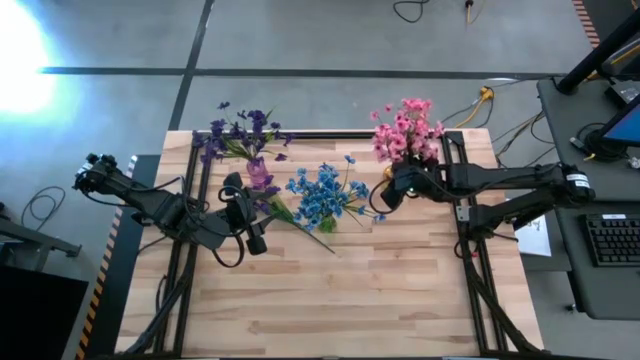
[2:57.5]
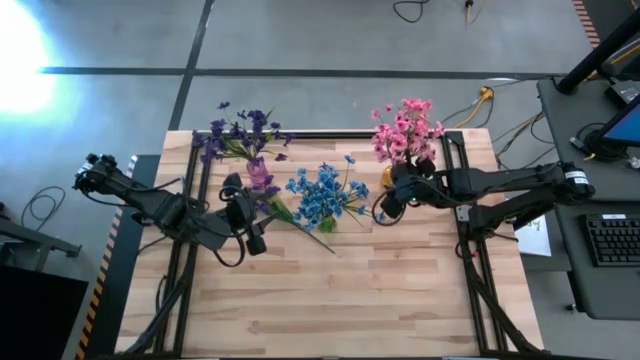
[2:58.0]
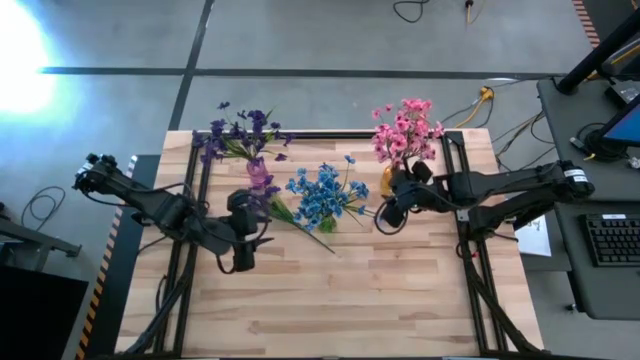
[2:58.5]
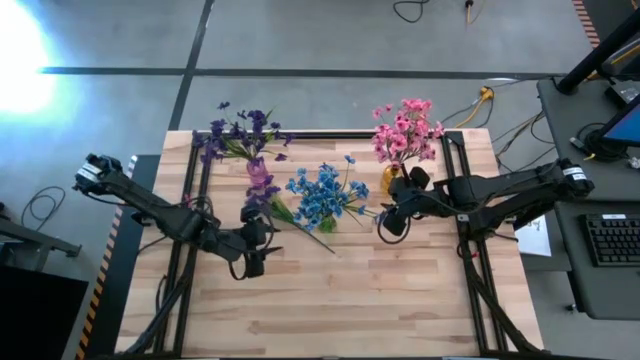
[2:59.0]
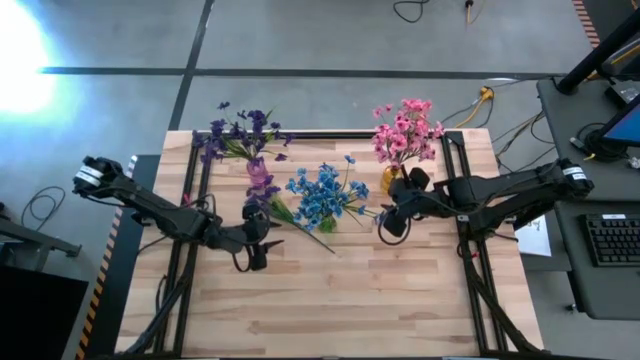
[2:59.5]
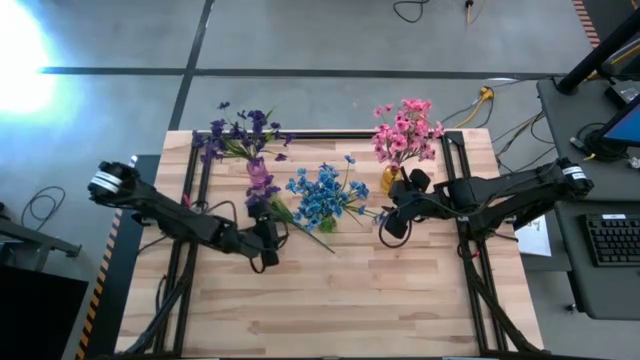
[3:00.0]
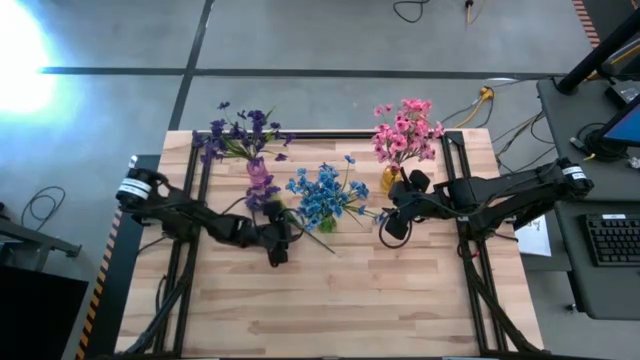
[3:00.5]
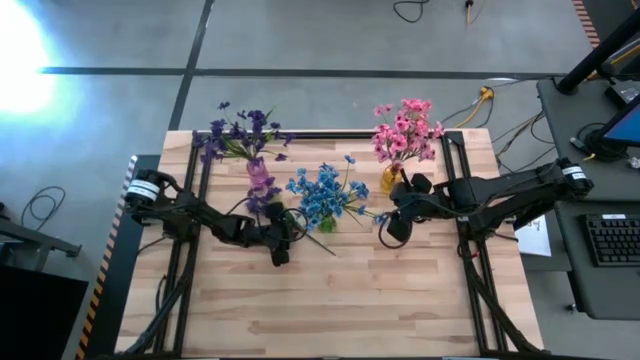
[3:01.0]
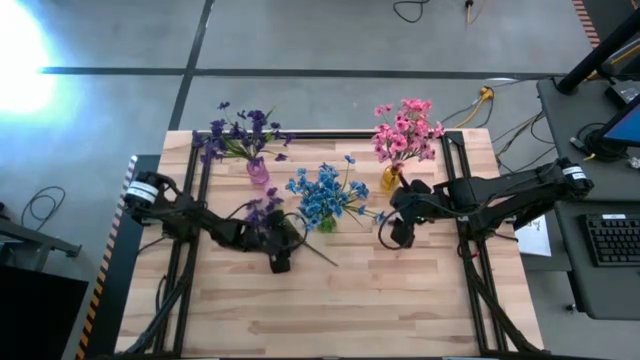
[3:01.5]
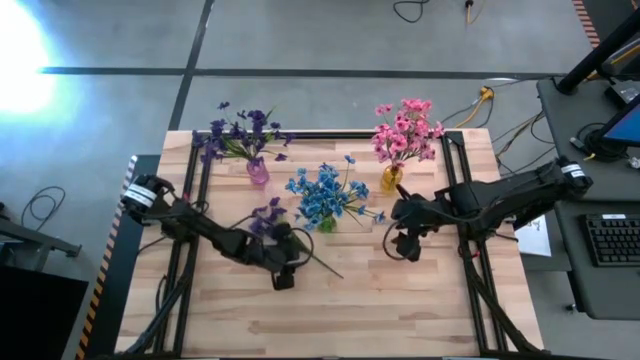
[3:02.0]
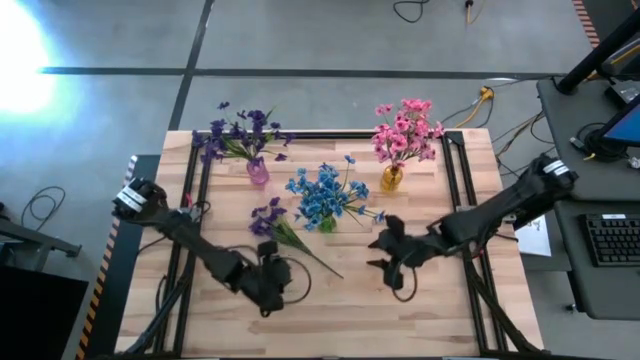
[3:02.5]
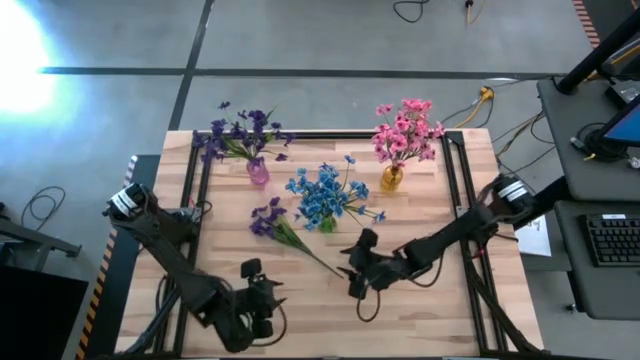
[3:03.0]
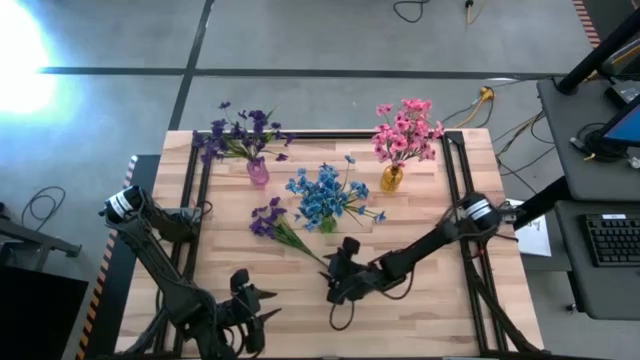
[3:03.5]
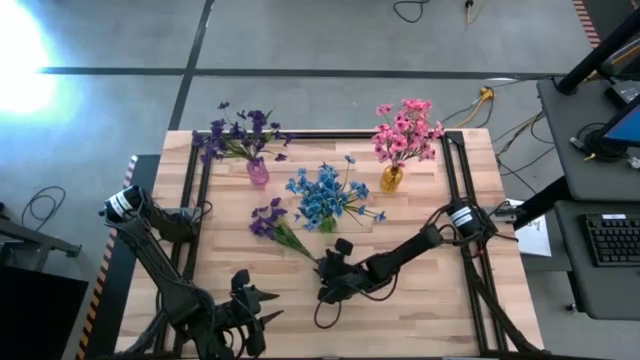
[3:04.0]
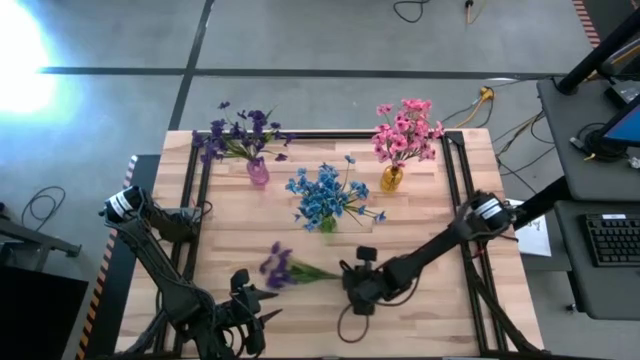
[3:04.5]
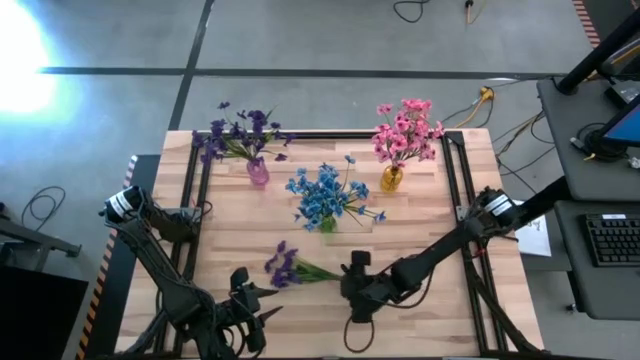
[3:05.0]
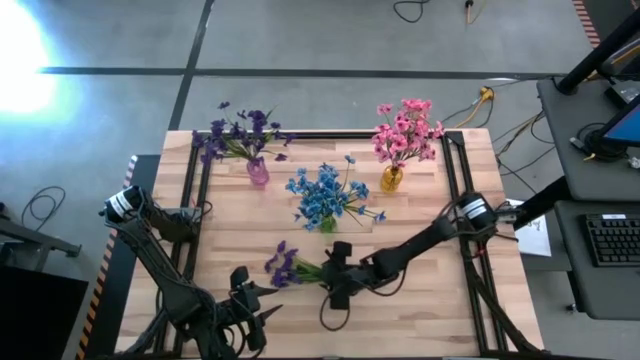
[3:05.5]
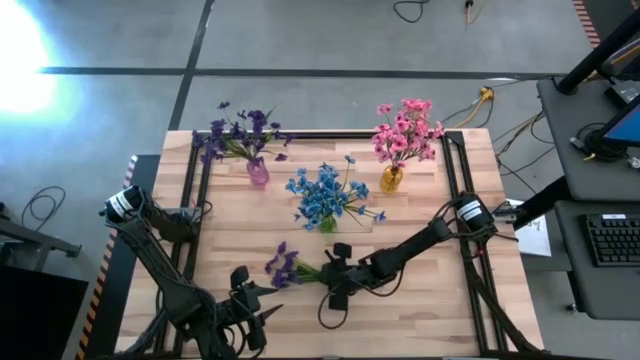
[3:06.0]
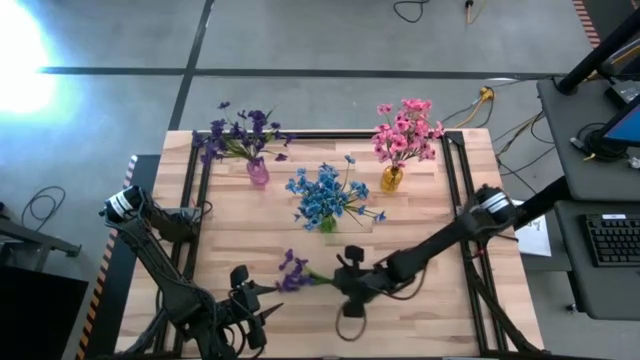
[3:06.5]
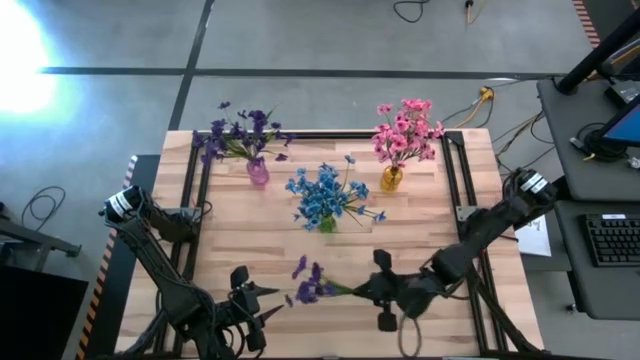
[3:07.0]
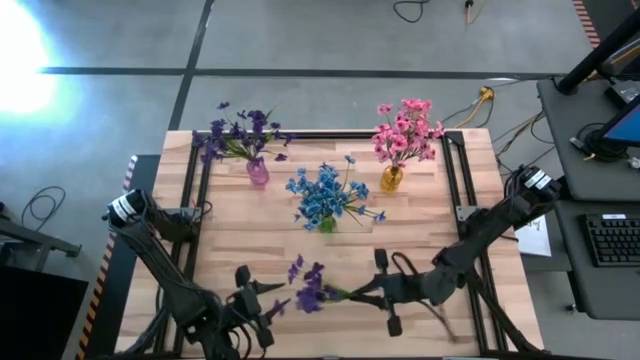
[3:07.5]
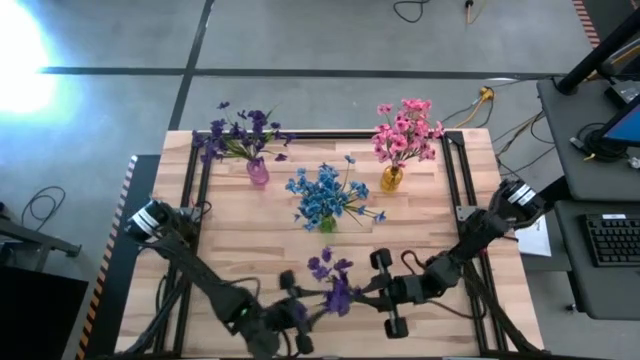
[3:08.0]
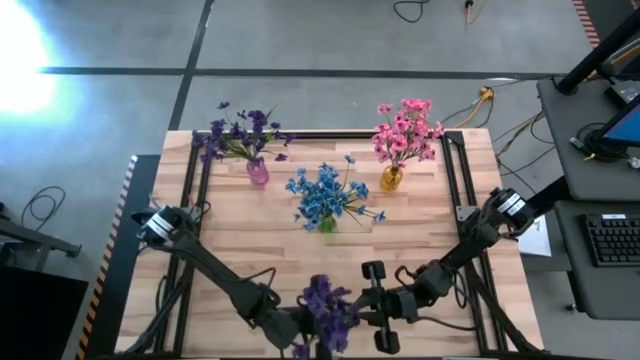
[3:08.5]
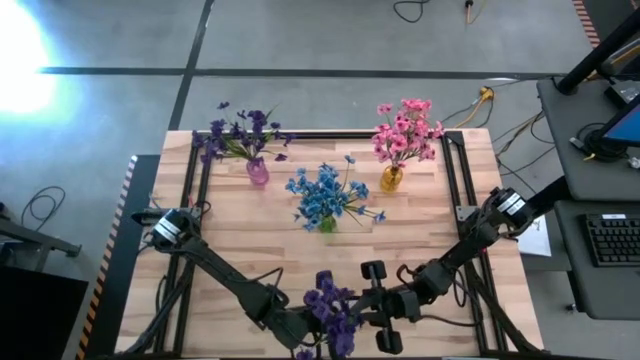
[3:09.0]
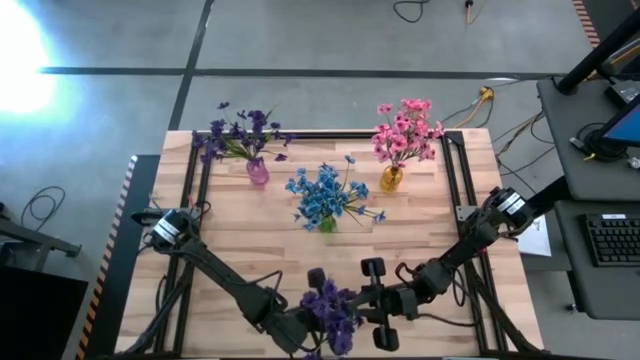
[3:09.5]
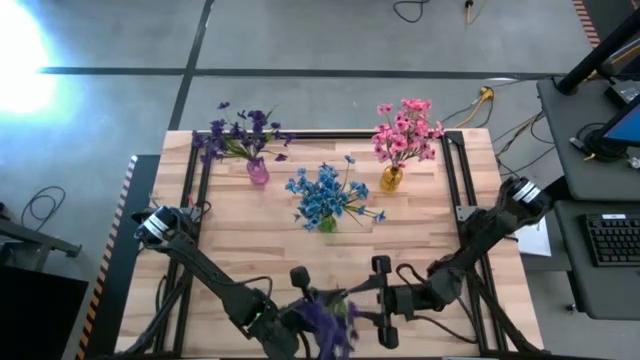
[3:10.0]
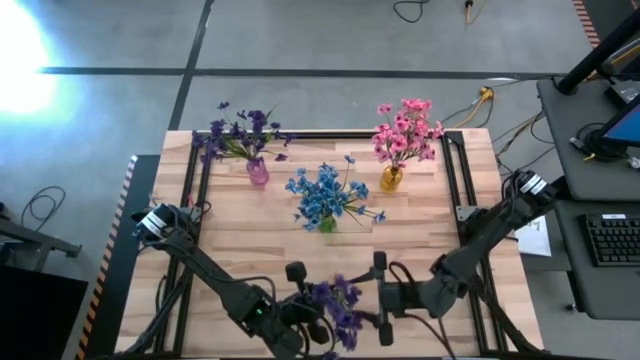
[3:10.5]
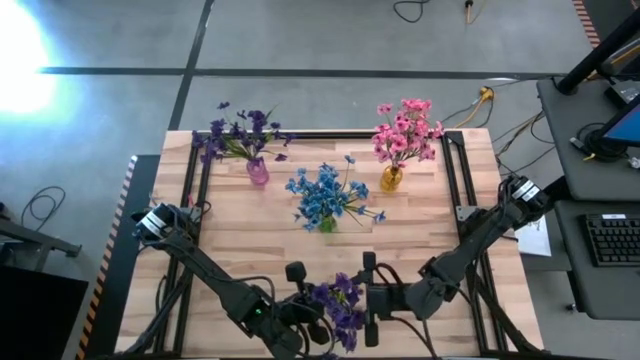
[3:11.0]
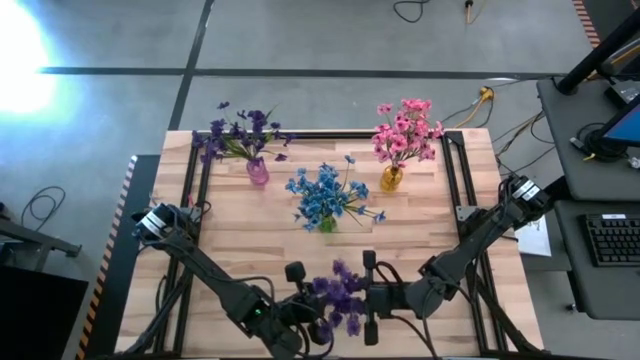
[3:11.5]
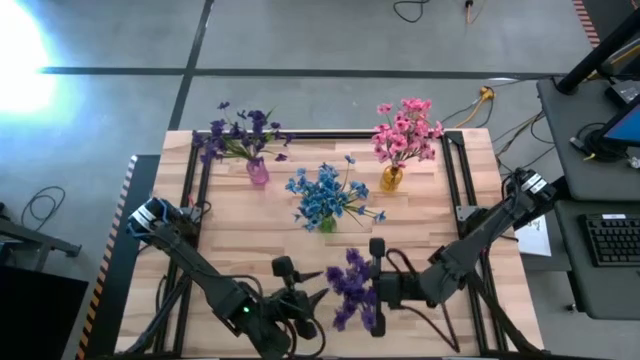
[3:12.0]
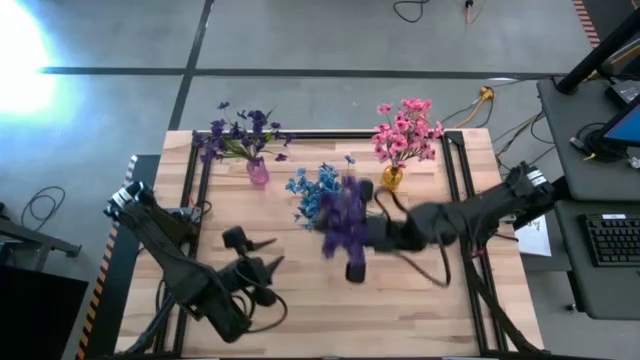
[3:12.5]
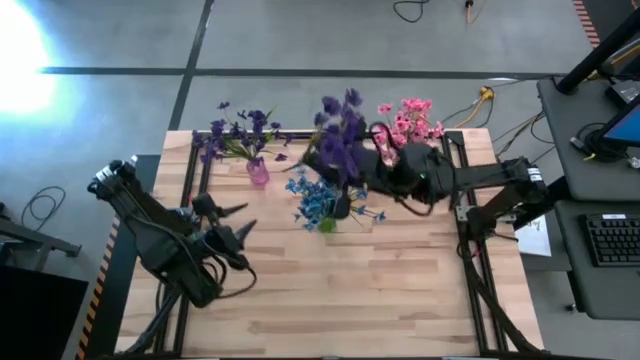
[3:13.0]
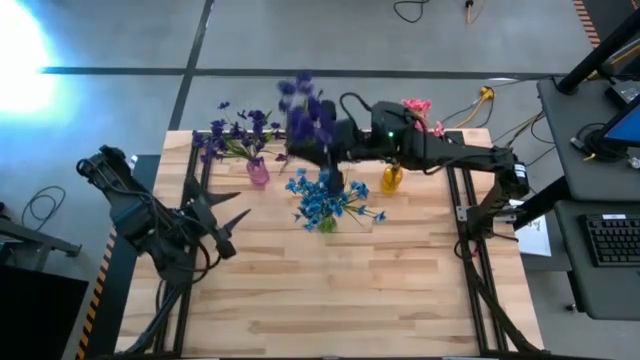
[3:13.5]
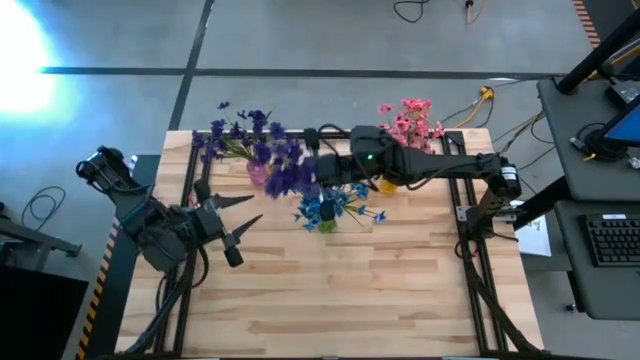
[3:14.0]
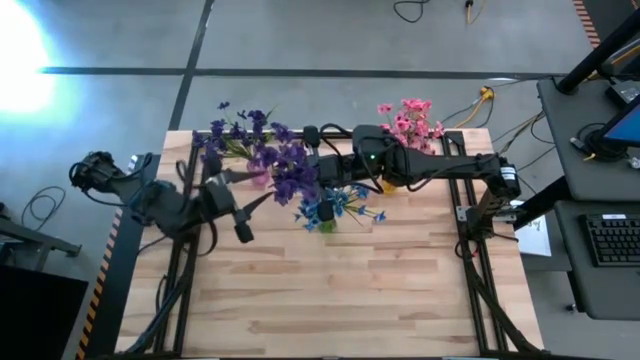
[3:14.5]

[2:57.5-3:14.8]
Task: Sort flowers into vase by color
Put the violet flowers into the violet vase
